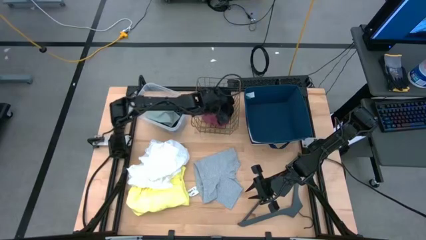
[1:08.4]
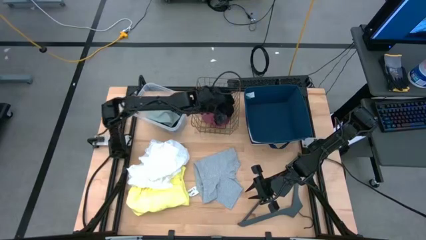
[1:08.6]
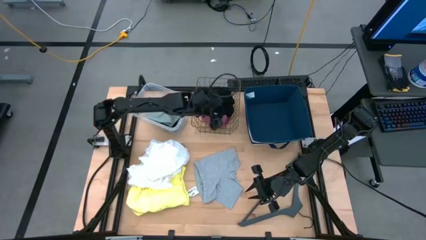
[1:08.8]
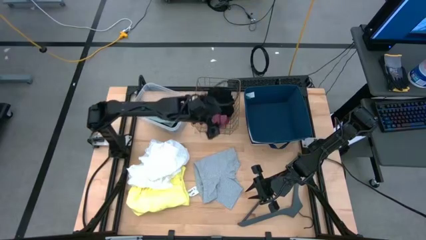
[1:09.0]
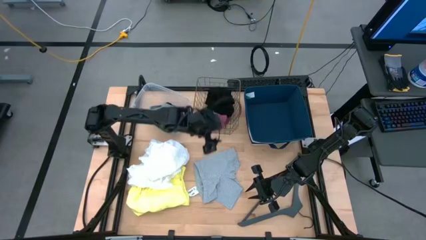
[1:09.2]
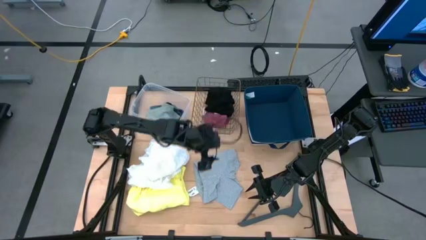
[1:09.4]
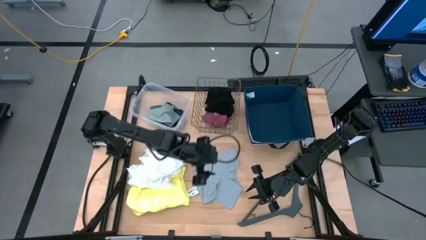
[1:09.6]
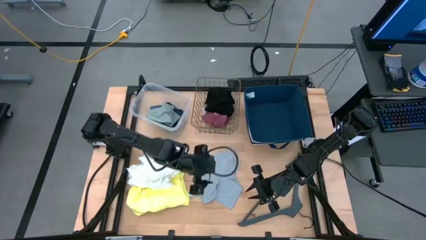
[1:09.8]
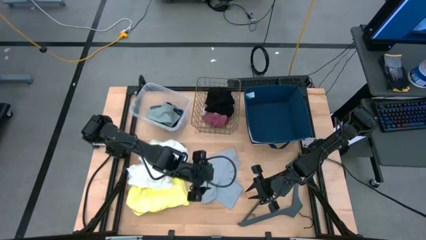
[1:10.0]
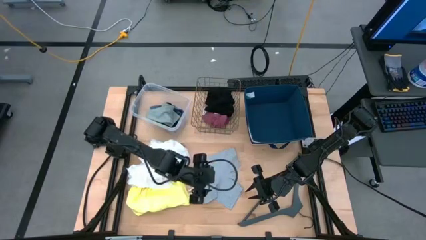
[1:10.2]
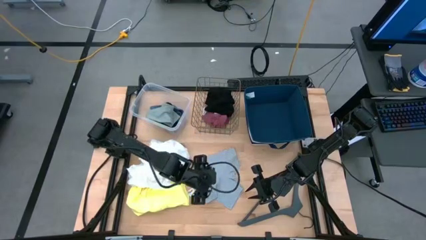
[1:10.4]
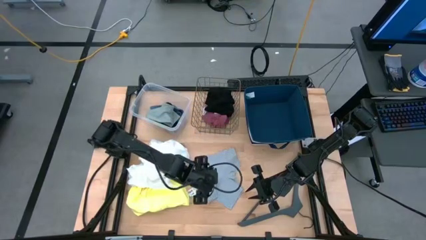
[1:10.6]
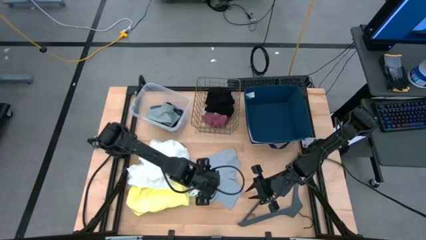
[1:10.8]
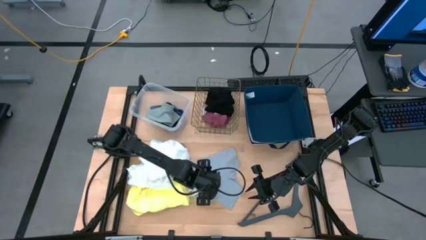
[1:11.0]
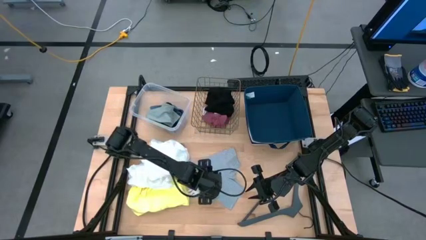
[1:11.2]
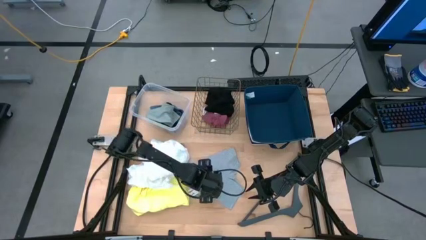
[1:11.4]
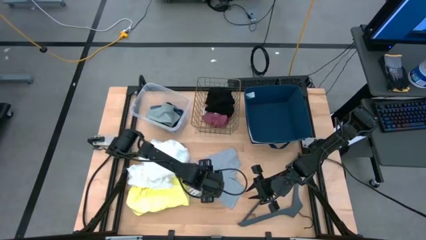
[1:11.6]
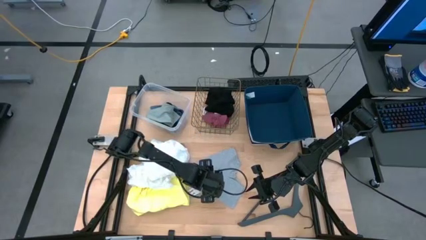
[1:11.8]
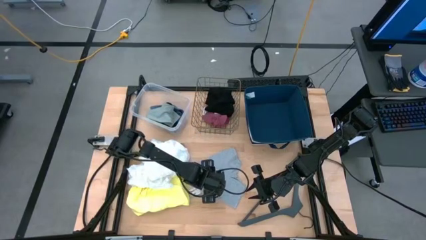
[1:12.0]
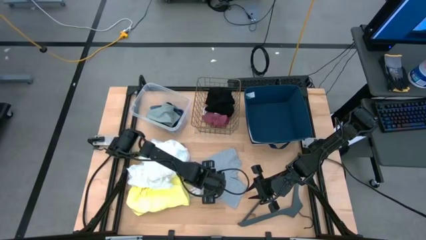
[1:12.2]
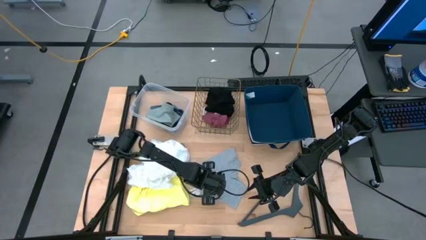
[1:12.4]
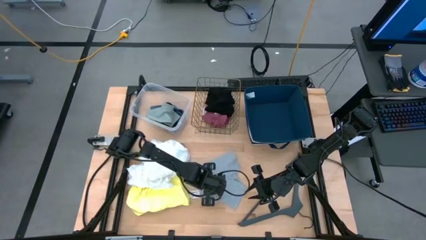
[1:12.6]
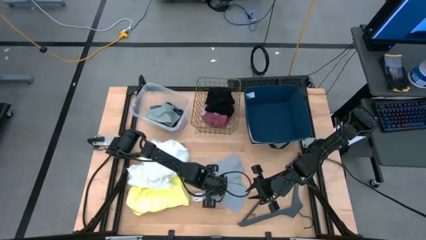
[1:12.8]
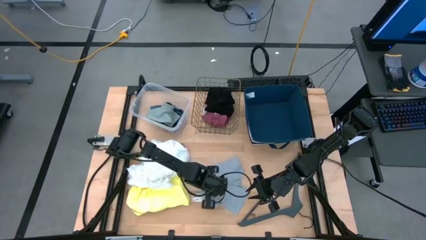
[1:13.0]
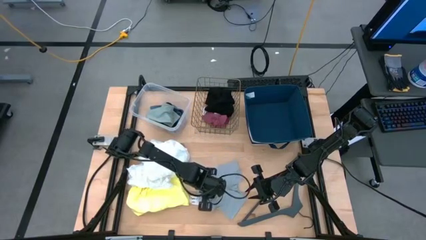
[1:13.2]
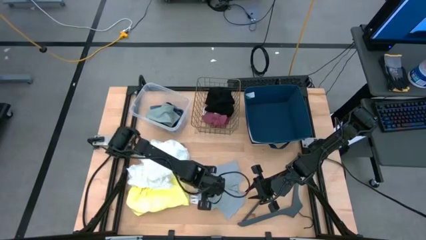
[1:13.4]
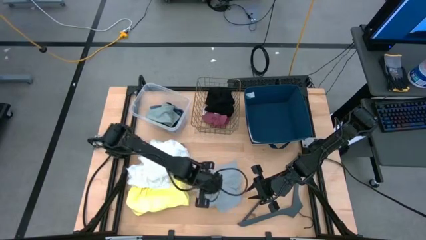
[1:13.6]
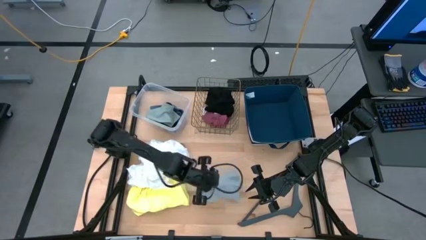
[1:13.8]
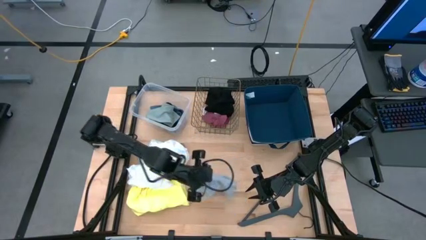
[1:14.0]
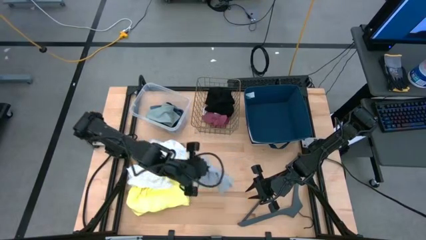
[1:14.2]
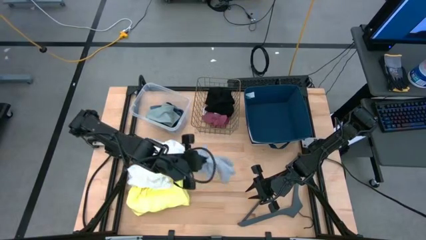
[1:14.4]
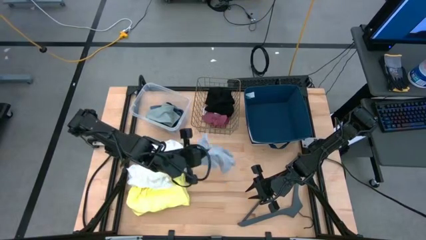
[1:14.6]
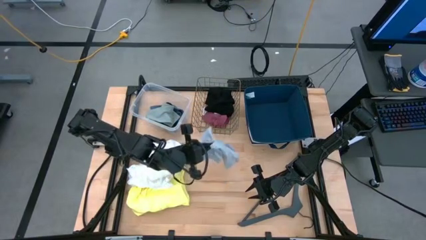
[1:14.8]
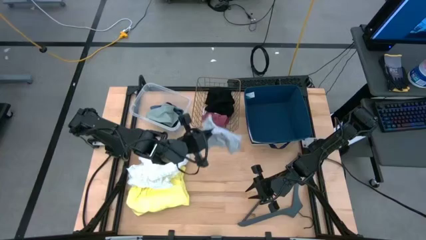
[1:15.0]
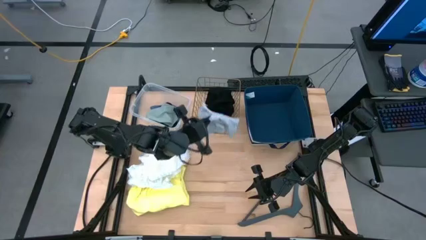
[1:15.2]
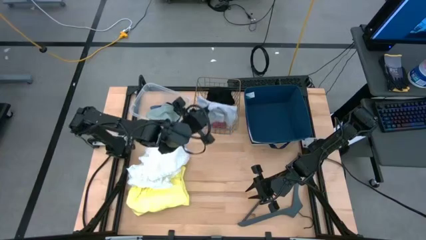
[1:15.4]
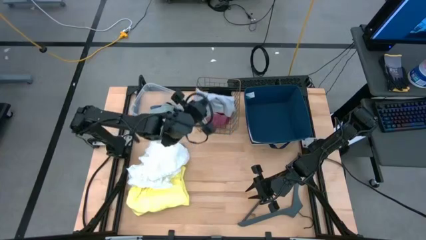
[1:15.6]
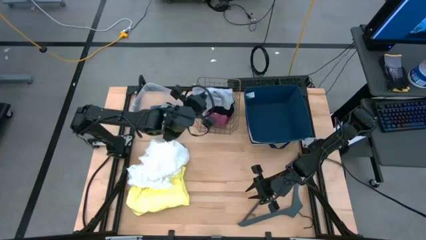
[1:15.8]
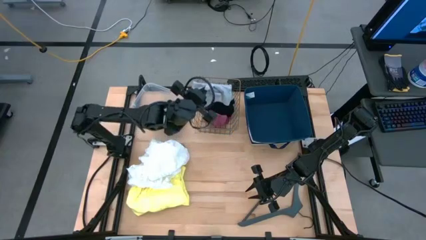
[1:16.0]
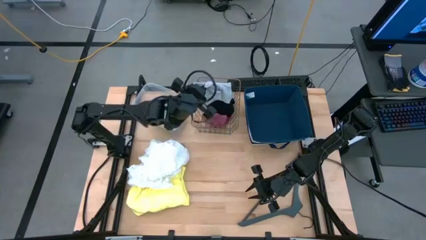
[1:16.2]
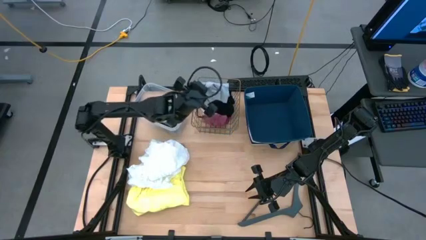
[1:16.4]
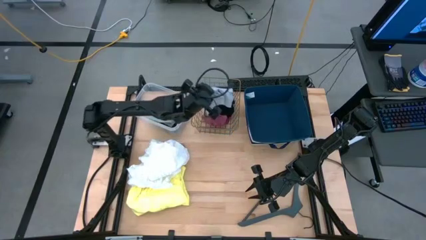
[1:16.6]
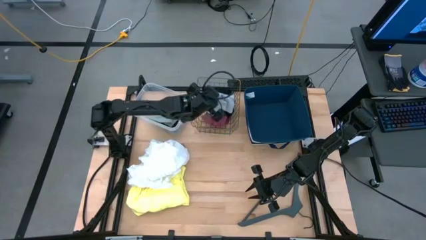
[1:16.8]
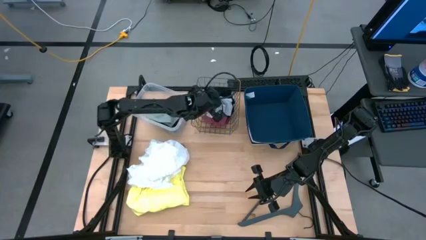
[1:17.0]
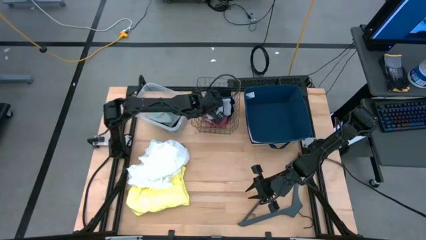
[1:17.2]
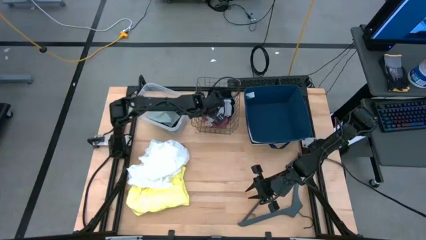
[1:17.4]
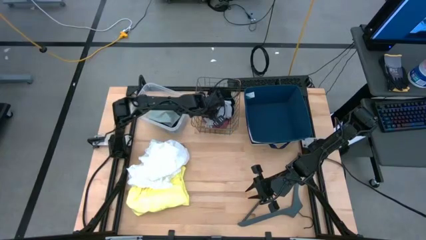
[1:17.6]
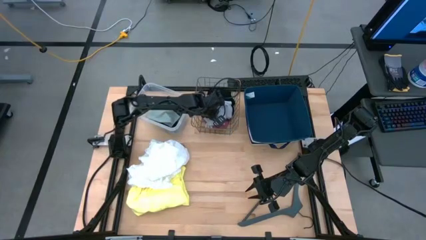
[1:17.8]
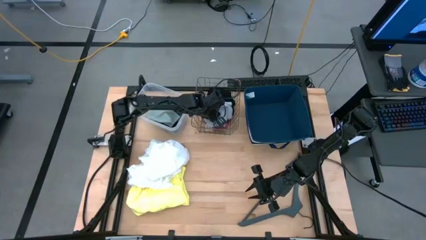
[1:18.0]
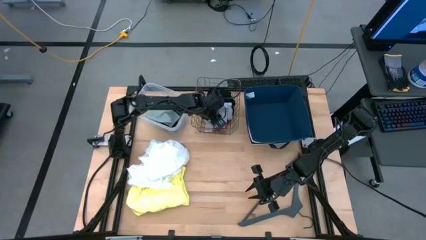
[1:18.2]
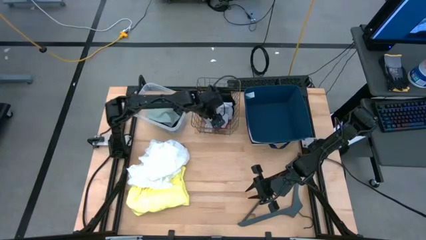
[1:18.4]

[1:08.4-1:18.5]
Task: Pick & Place Cloths
Put the gray shorts into the mesh basket

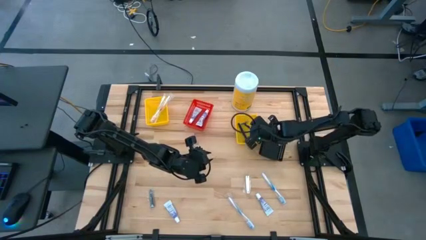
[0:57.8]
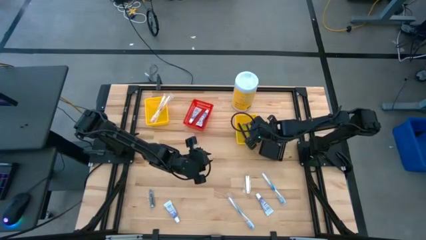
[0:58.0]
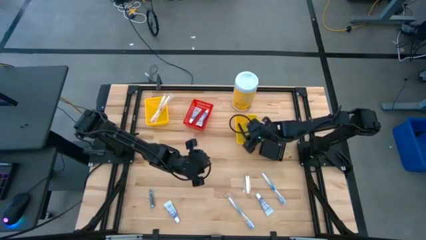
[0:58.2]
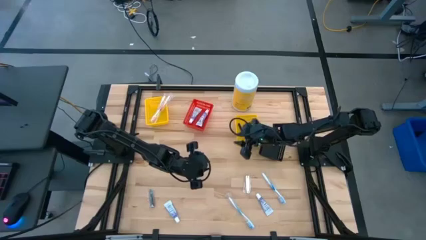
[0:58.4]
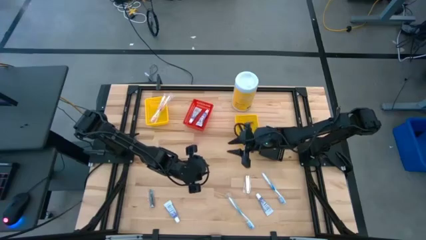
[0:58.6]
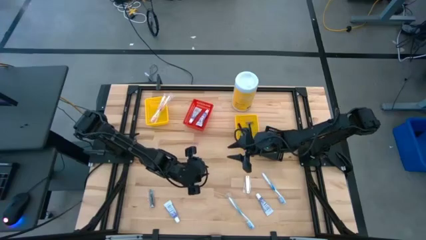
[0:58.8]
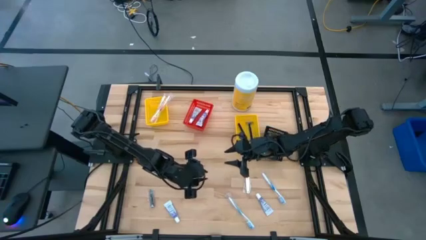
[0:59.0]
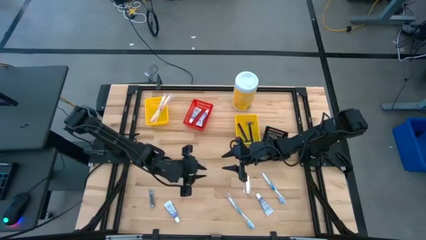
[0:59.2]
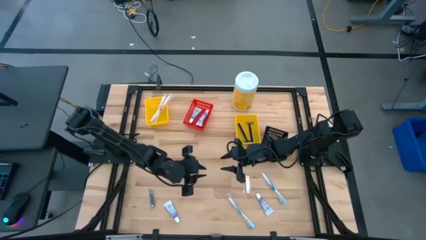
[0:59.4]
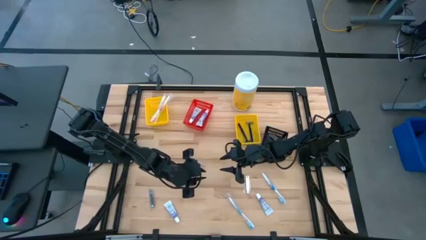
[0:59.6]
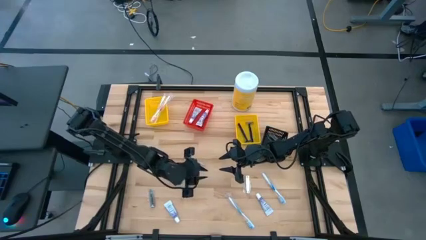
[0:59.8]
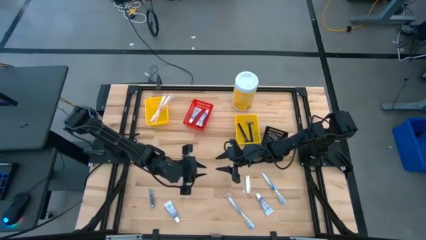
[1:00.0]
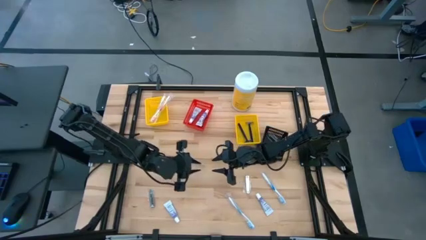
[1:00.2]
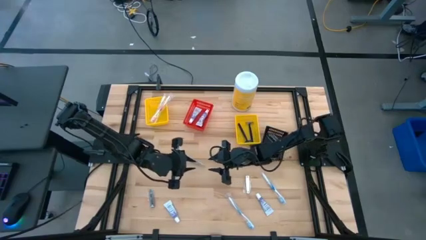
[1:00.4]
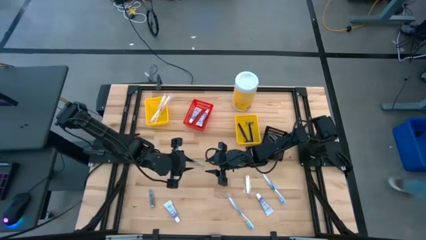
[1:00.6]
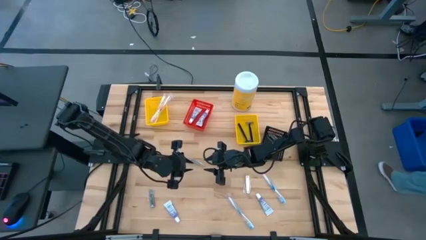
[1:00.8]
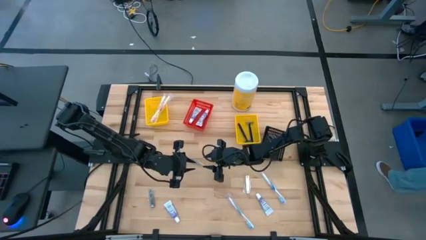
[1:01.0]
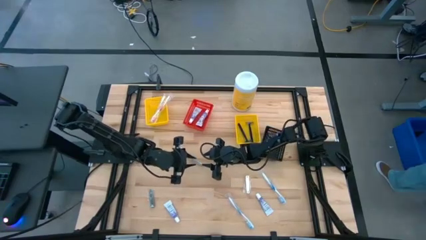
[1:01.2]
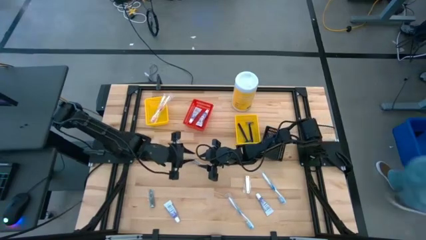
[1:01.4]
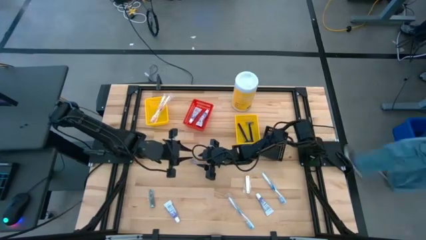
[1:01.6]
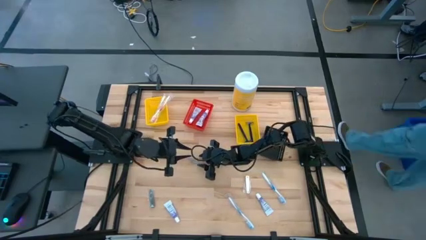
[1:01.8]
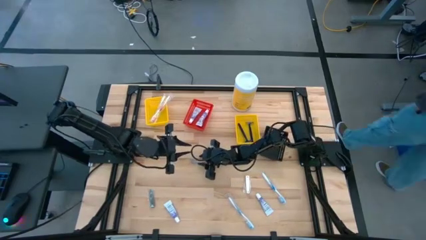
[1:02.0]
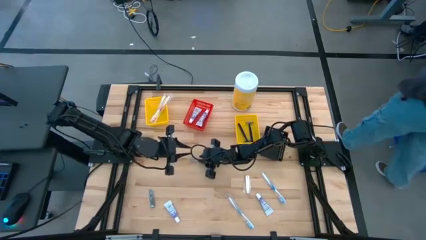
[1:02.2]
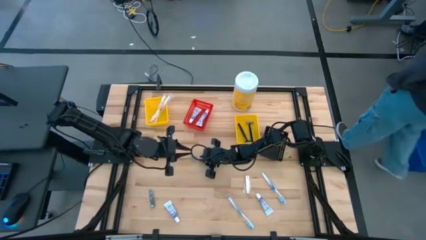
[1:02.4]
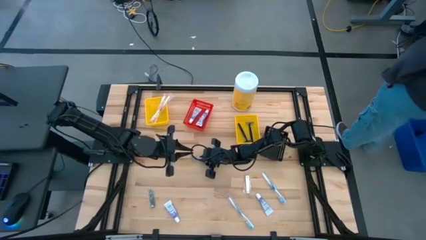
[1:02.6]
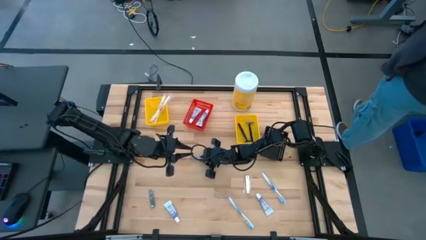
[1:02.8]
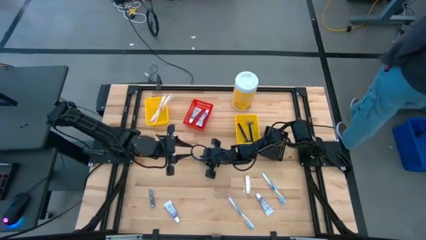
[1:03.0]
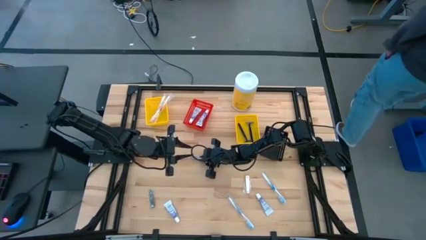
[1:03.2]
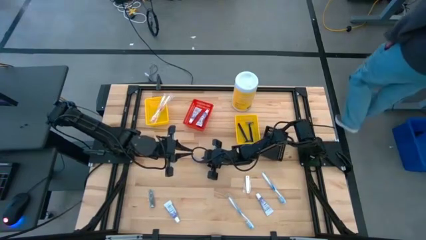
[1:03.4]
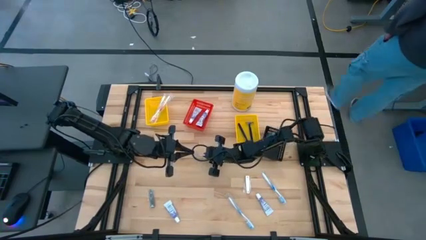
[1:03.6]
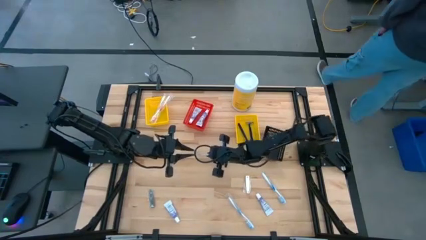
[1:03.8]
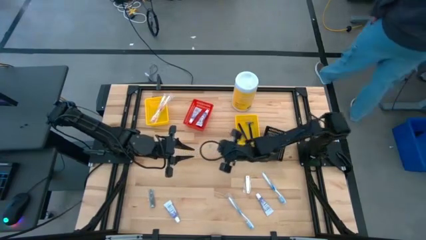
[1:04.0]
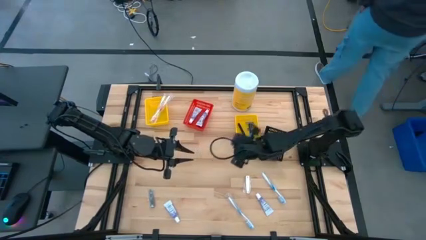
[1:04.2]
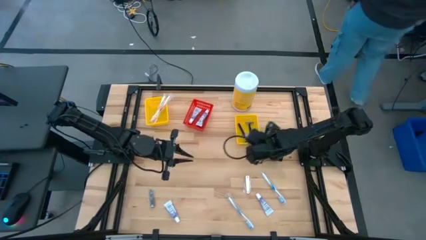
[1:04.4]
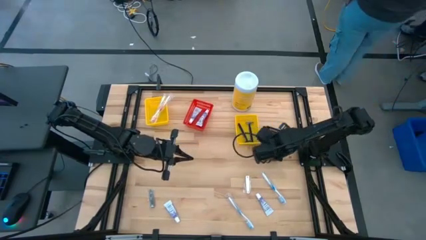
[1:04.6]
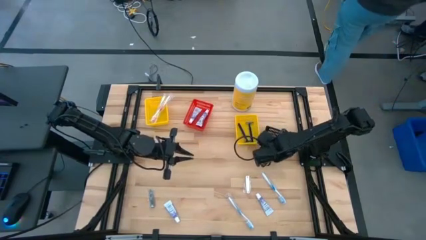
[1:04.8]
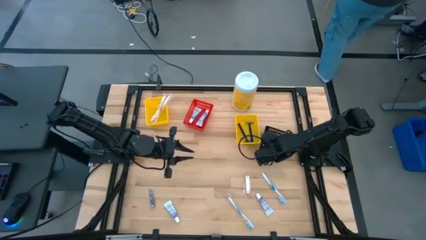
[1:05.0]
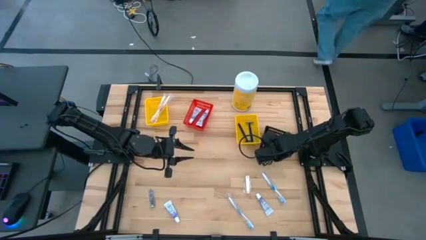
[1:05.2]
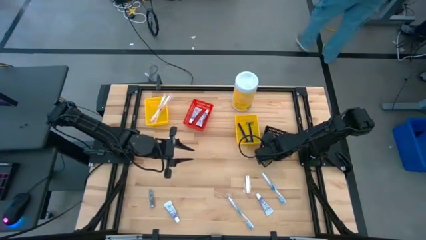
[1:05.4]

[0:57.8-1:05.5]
Task: Pick & Place Travel size toiletries
Put the silver nail cutter into the black basket
